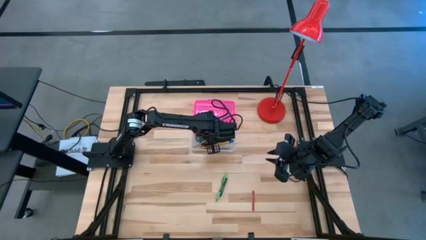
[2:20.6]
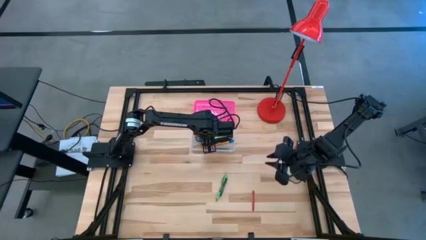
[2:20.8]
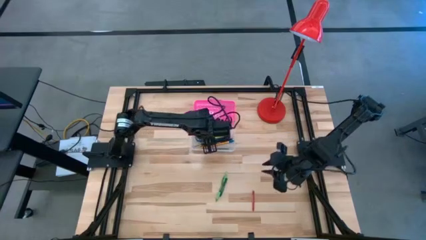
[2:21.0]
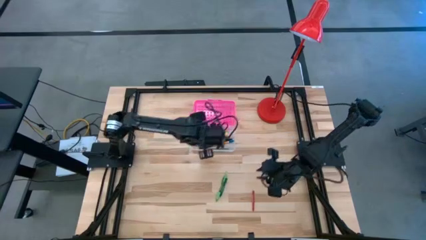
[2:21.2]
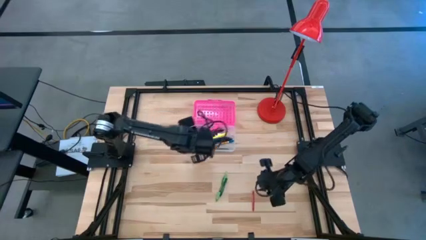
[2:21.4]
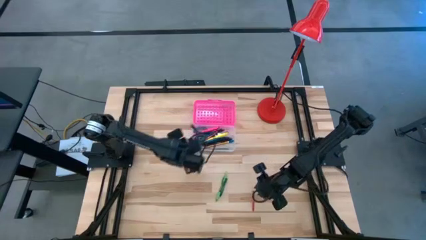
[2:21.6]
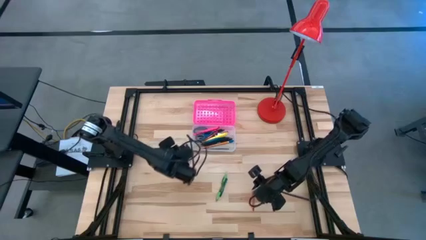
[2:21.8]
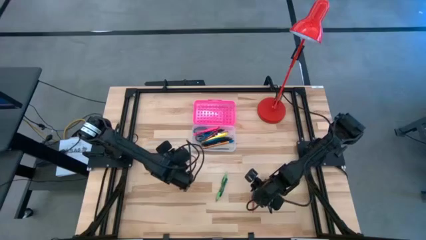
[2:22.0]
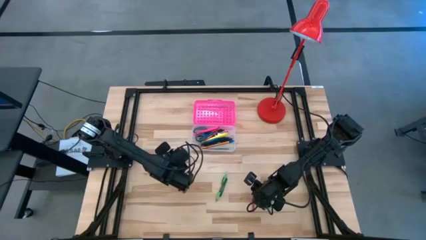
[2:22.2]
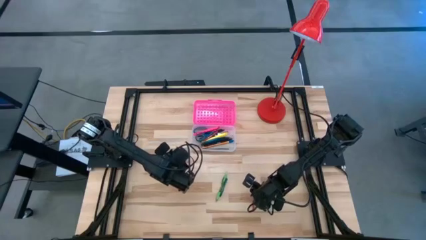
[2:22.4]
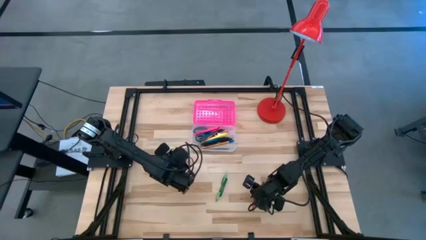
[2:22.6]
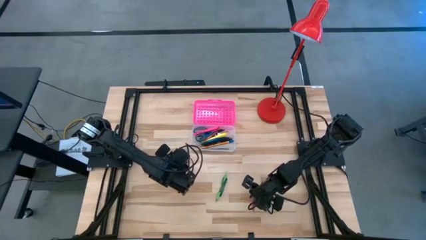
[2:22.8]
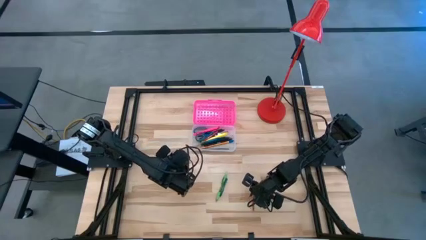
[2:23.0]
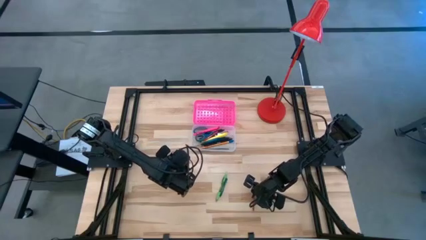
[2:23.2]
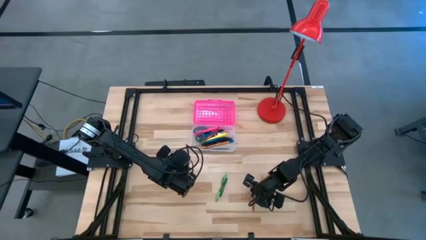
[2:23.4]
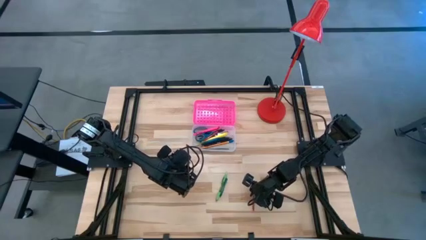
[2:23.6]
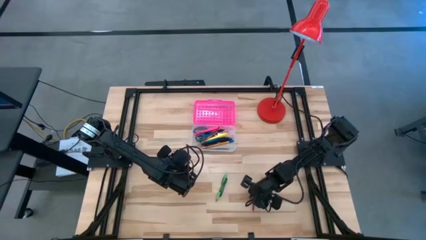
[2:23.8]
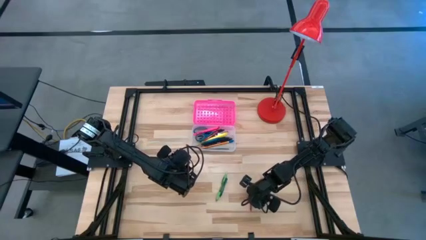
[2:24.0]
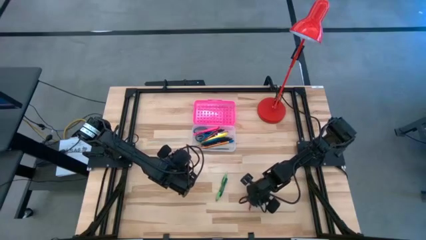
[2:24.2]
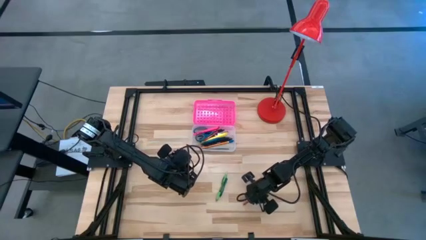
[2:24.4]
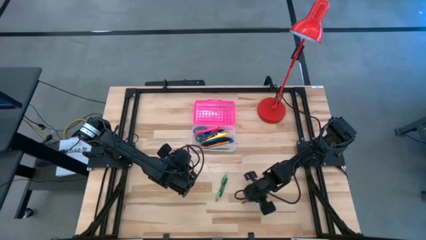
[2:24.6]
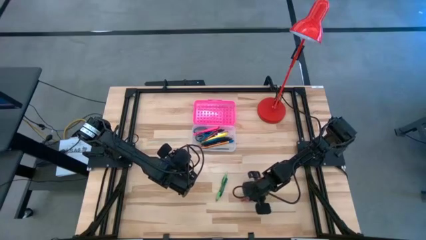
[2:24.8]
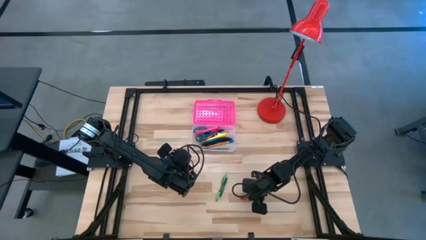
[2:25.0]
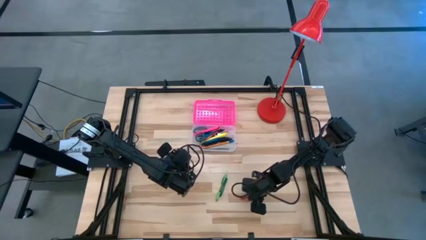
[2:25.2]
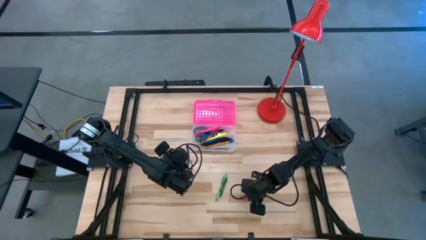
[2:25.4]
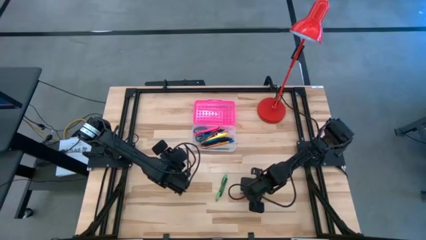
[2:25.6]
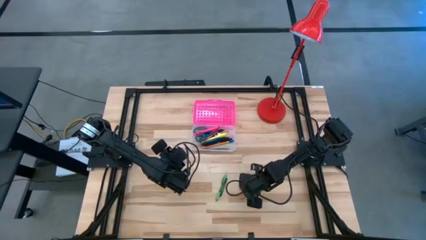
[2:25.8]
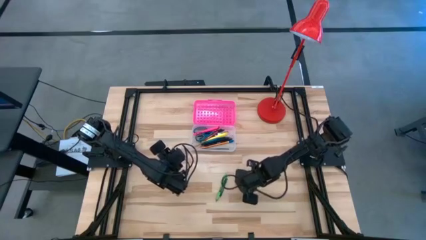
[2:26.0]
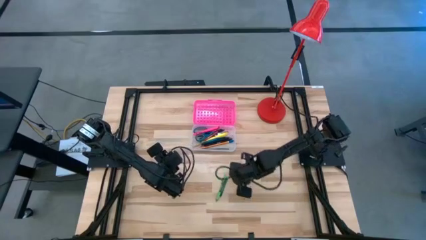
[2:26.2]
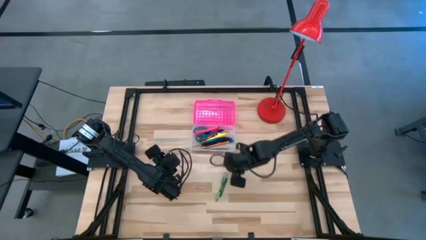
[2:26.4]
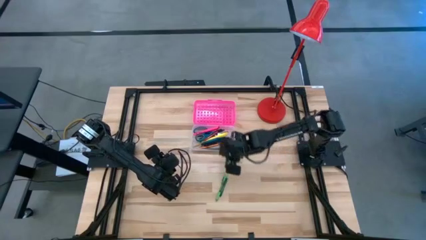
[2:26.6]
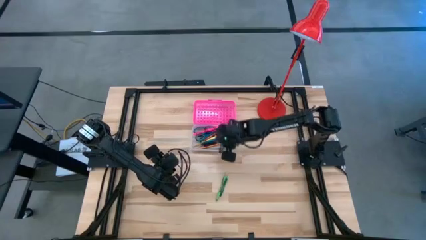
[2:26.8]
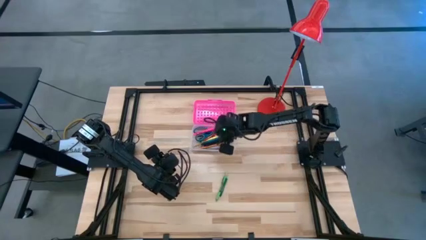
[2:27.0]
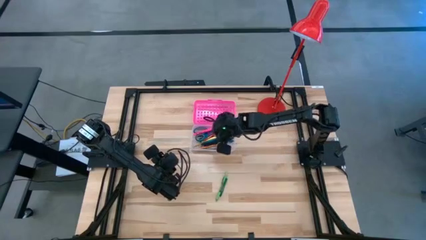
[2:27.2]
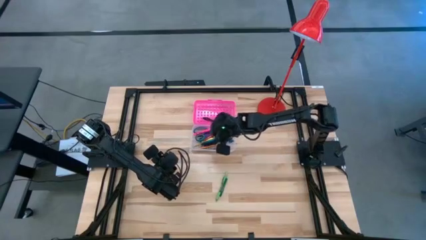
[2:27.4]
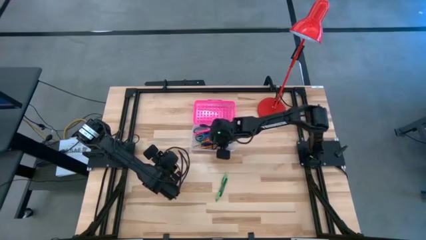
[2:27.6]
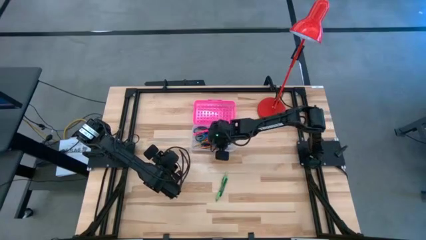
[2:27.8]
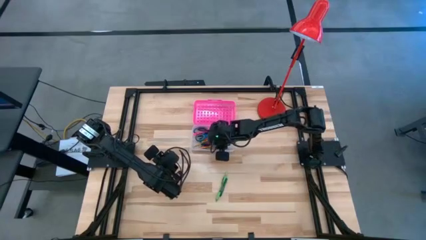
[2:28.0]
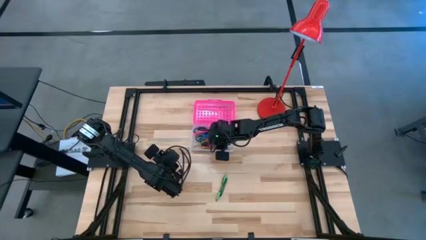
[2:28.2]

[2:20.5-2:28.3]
Task: Pick & place school supplies into a supply box
Put the red crayon into the pink supply box

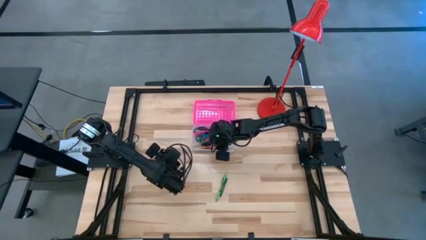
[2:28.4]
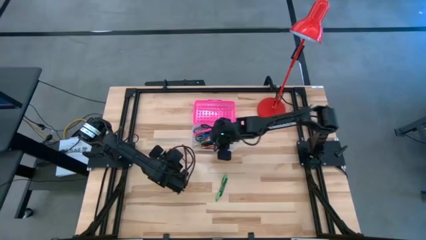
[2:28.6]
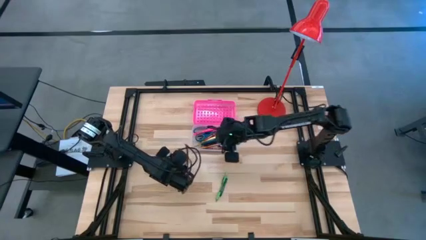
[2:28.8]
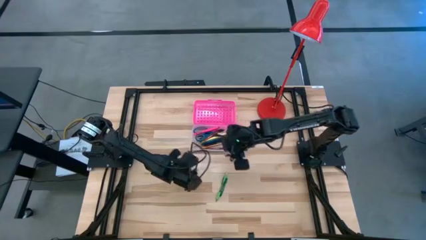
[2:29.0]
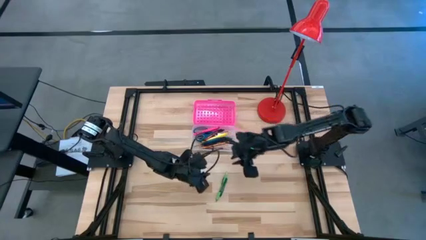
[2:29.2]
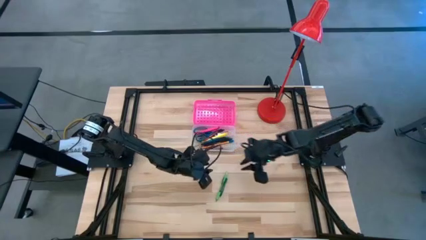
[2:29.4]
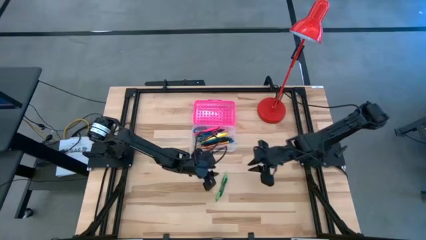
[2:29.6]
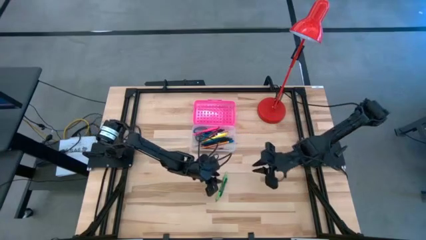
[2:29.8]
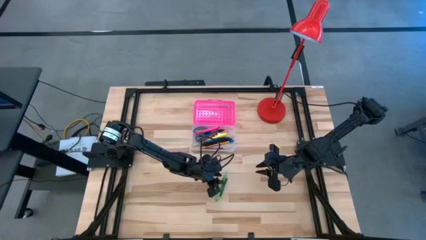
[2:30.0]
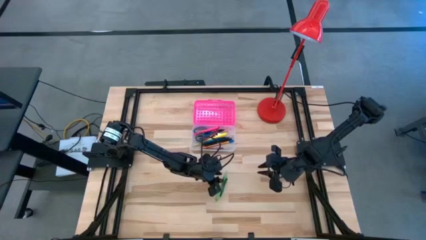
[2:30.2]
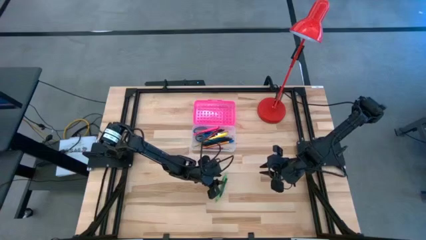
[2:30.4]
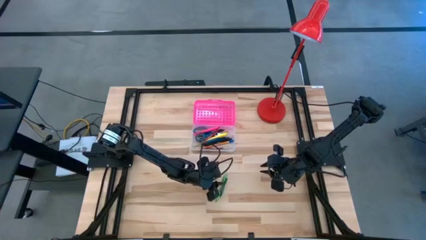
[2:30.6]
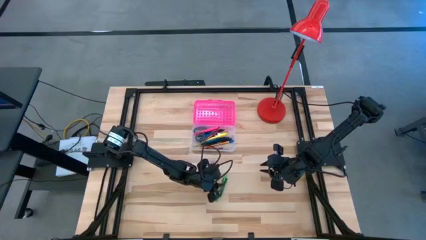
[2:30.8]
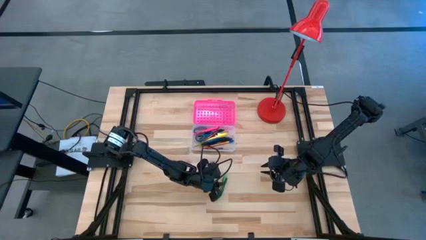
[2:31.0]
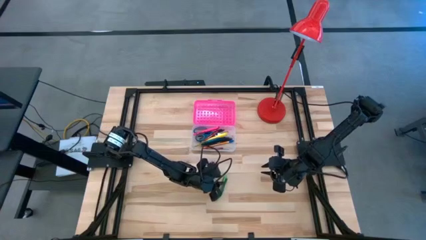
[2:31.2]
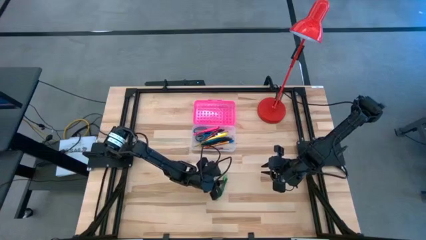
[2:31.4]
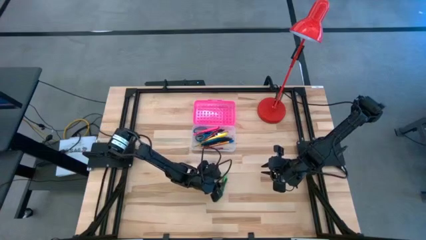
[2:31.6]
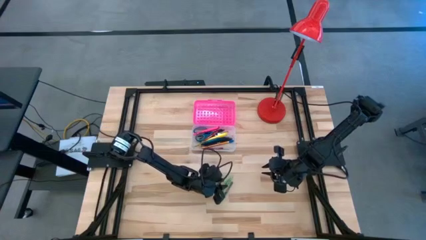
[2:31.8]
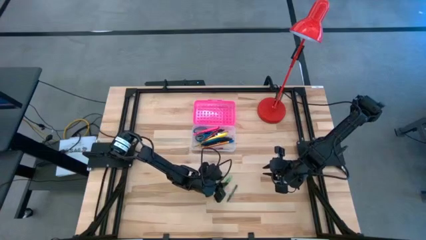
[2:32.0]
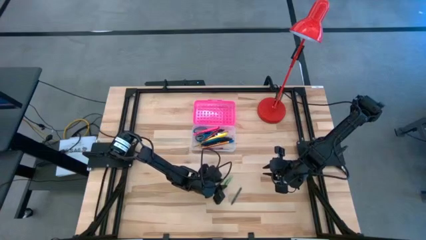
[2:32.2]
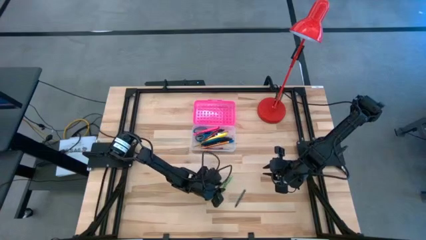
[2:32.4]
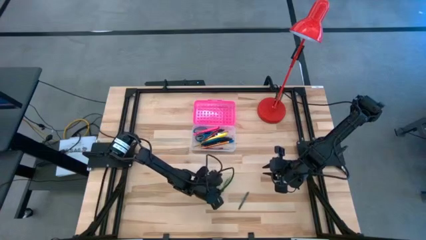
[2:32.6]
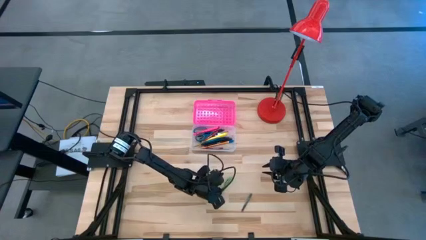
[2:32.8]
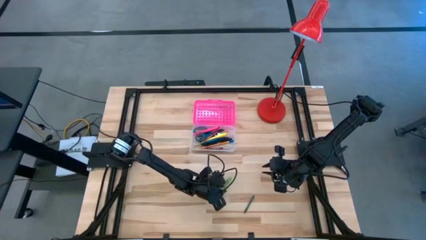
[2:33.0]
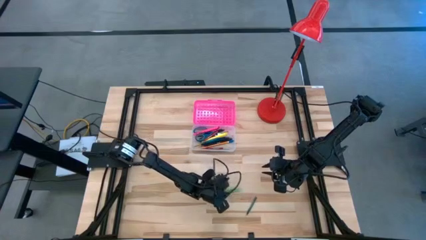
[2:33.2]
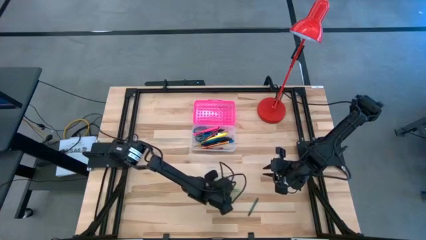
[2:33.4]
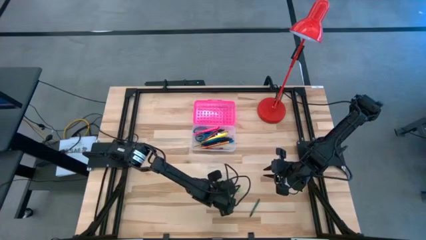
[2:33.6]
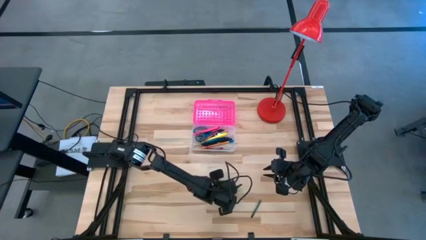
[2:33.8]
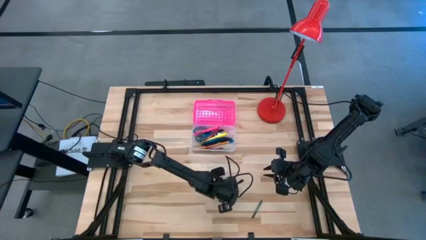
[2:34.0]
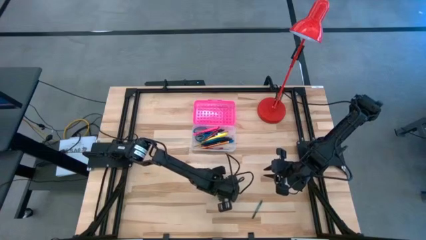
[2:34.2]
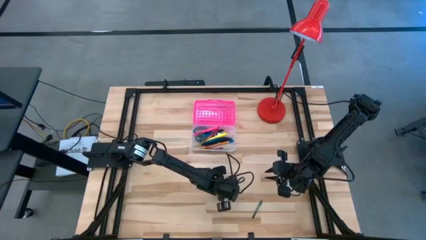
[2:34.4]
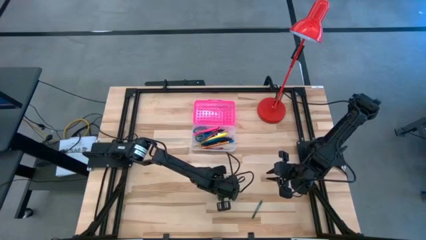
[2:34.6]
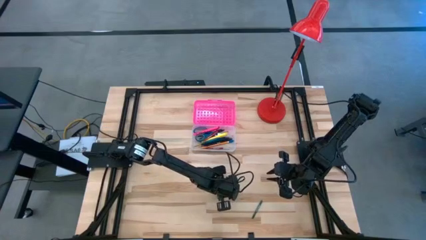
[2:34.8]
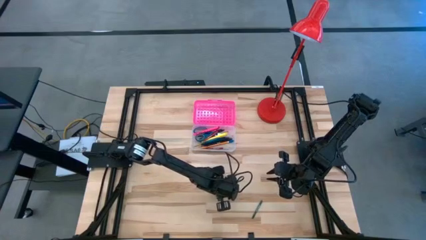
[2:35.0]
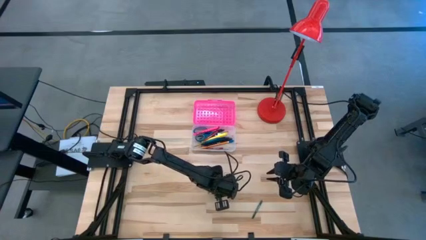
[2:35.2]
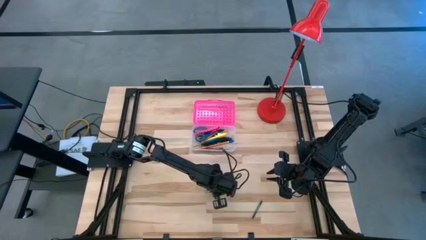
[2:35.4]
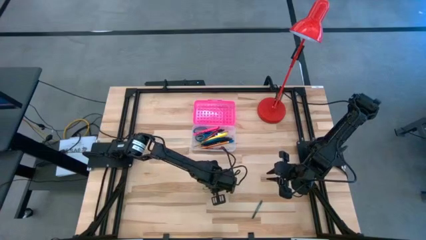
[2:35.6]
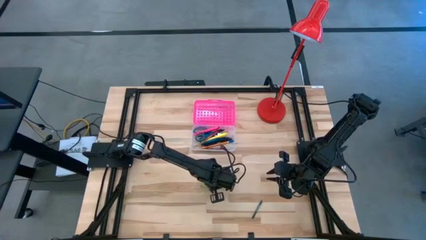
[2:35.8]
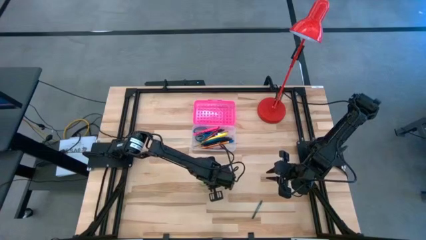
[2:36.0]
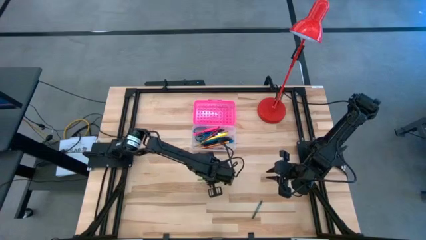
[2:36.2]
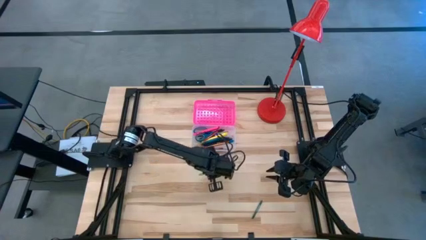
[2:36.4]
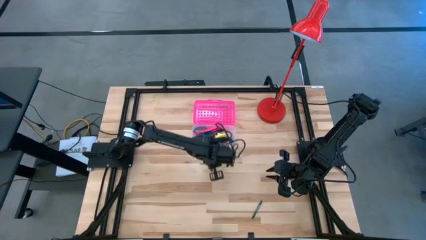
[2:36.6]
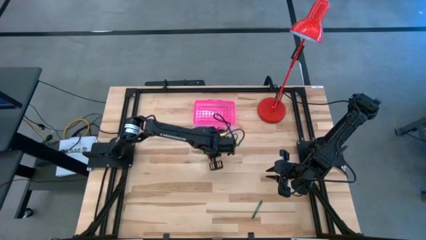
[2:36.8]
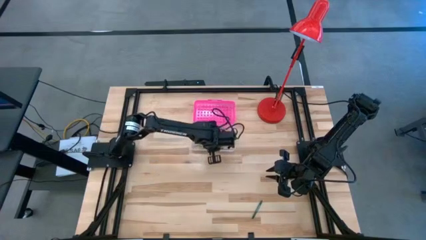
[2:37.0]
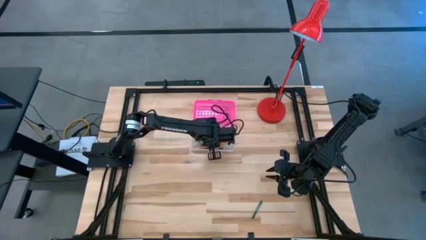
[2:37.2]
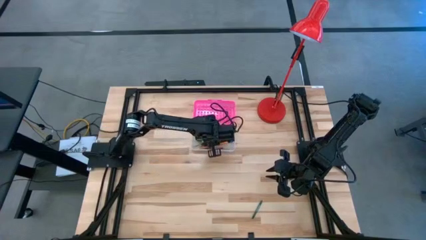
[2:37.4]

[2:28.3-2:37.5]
Put the green pen into the pink supply box
